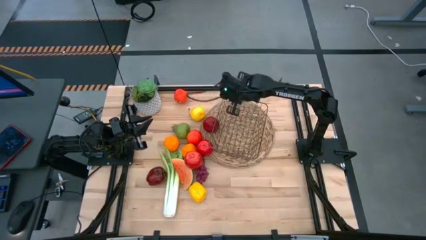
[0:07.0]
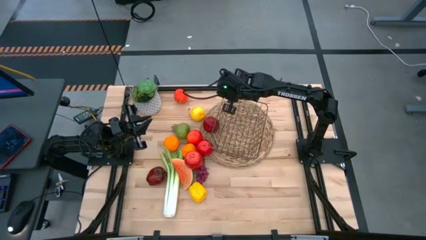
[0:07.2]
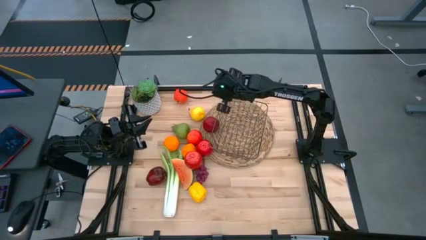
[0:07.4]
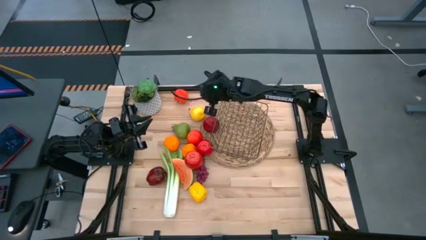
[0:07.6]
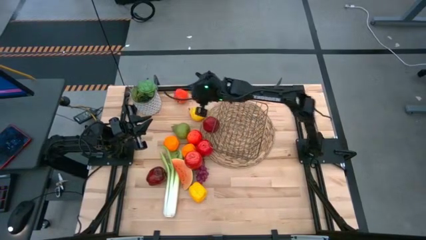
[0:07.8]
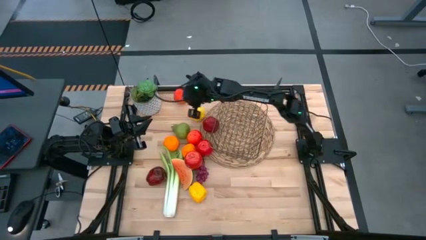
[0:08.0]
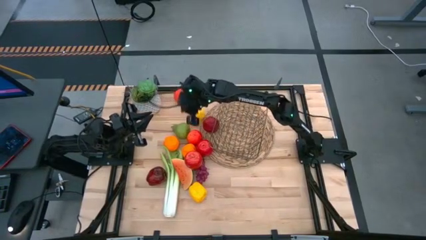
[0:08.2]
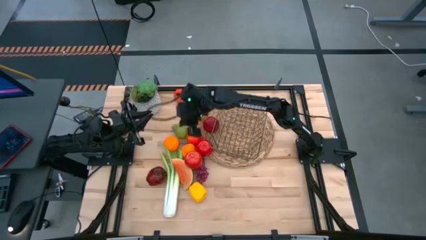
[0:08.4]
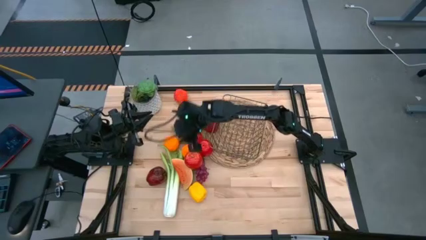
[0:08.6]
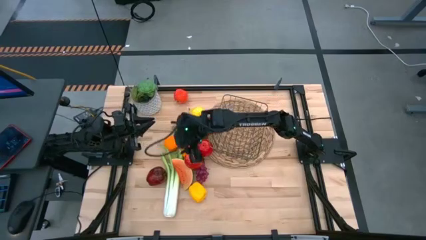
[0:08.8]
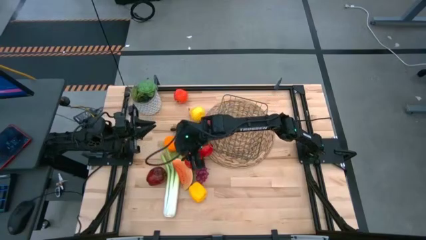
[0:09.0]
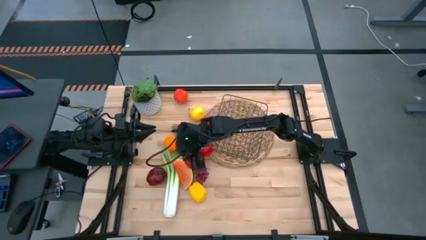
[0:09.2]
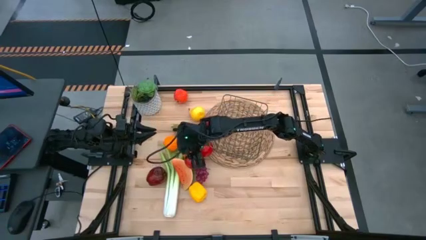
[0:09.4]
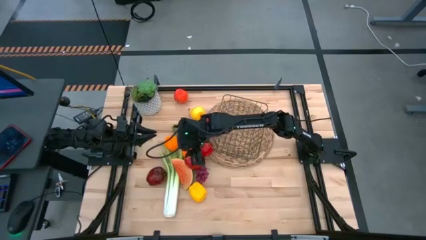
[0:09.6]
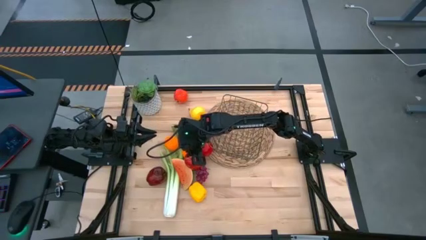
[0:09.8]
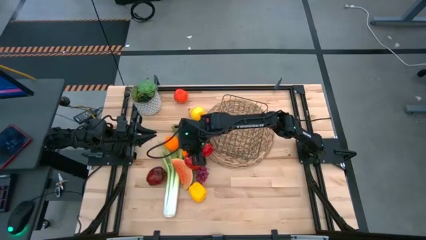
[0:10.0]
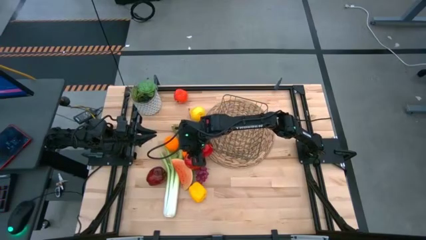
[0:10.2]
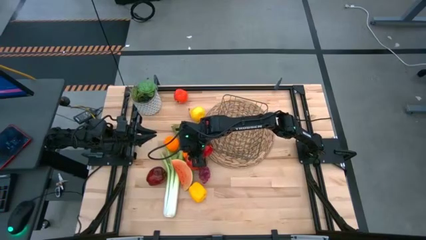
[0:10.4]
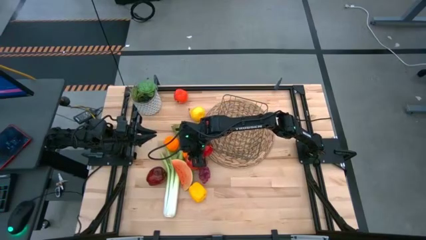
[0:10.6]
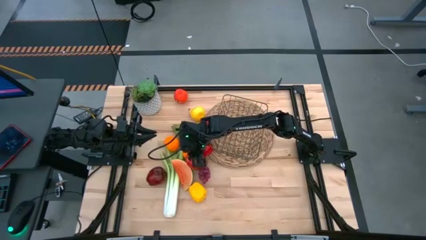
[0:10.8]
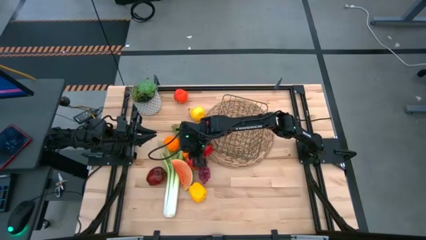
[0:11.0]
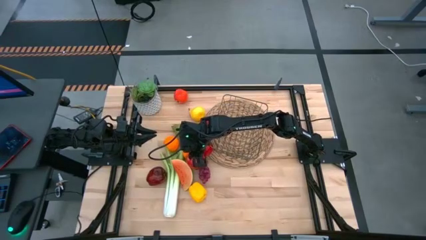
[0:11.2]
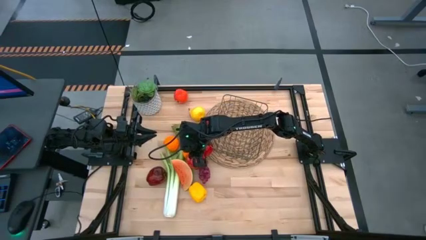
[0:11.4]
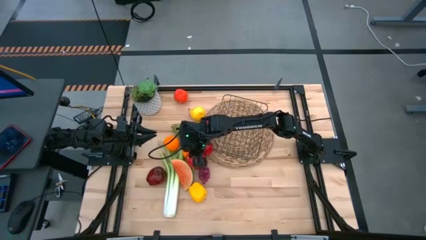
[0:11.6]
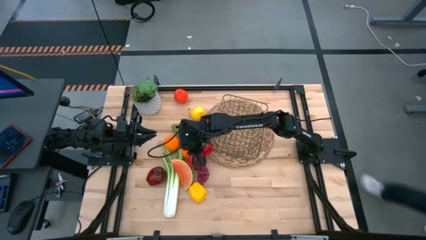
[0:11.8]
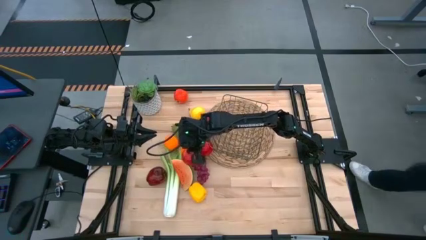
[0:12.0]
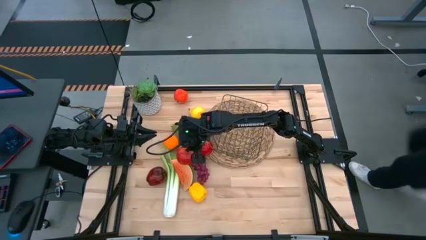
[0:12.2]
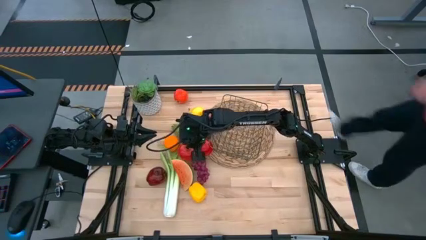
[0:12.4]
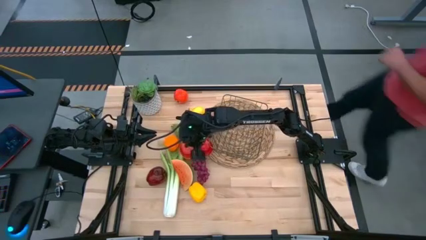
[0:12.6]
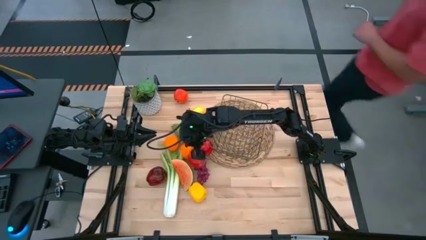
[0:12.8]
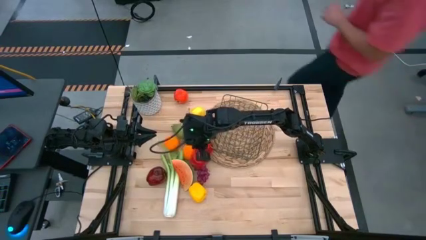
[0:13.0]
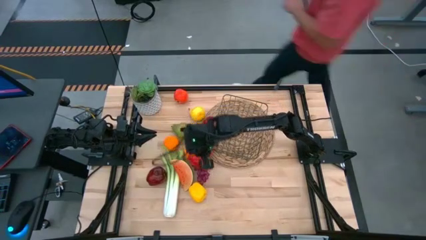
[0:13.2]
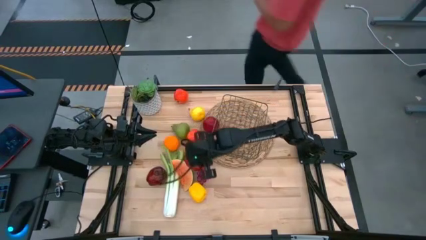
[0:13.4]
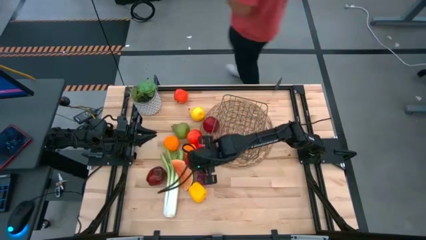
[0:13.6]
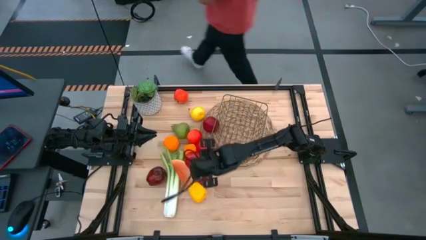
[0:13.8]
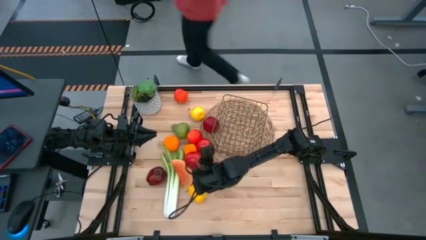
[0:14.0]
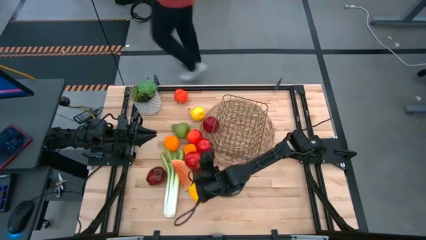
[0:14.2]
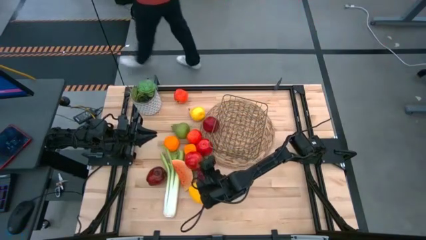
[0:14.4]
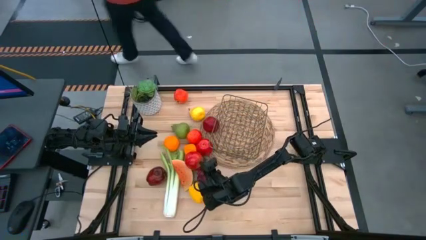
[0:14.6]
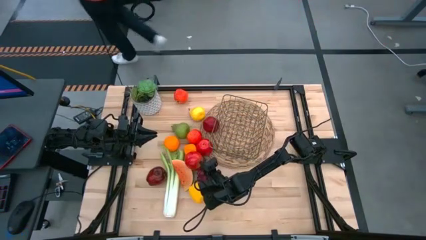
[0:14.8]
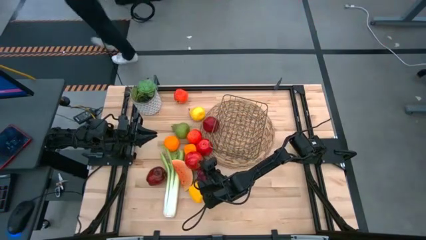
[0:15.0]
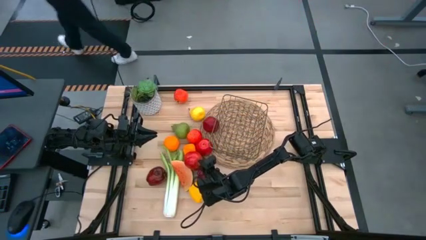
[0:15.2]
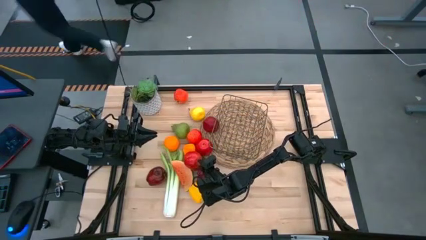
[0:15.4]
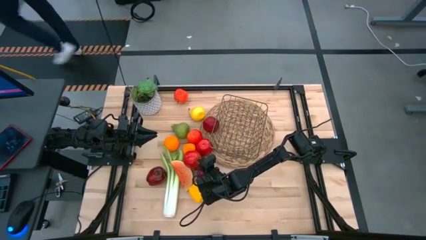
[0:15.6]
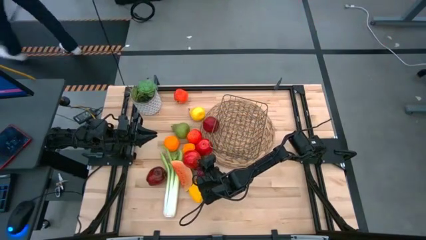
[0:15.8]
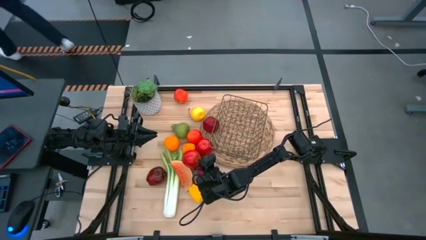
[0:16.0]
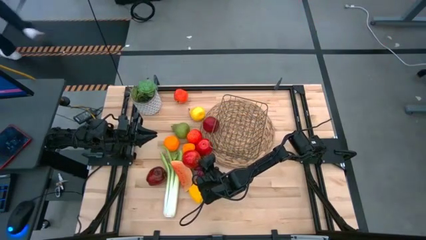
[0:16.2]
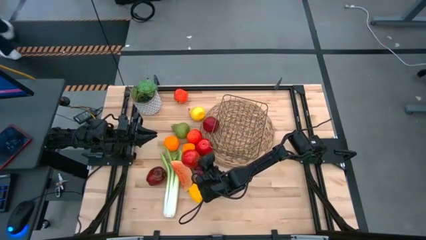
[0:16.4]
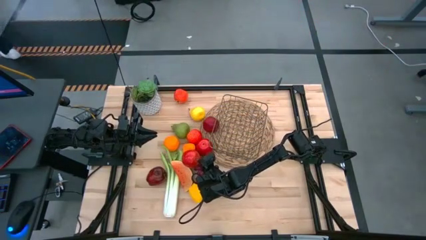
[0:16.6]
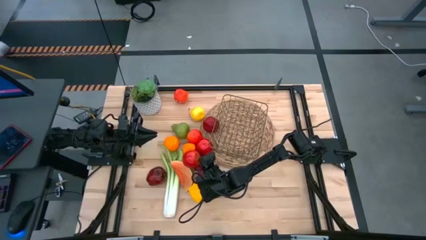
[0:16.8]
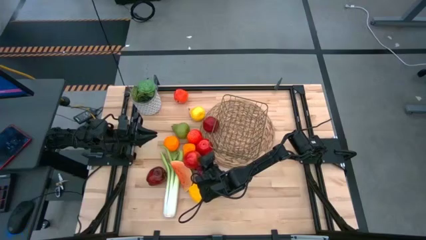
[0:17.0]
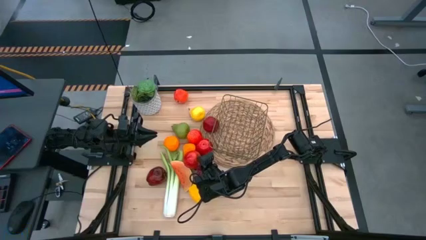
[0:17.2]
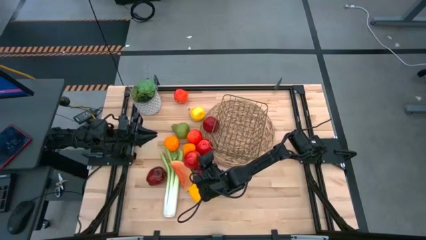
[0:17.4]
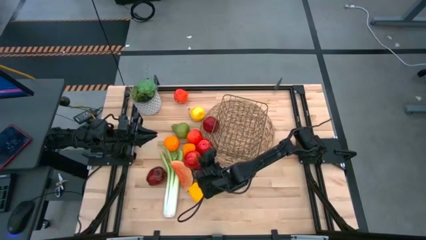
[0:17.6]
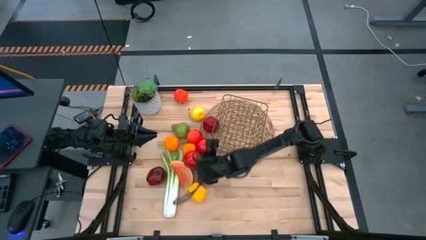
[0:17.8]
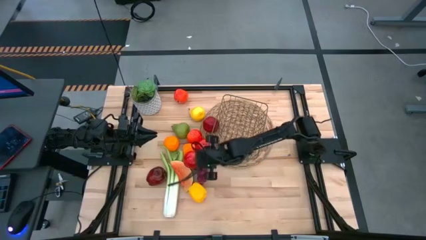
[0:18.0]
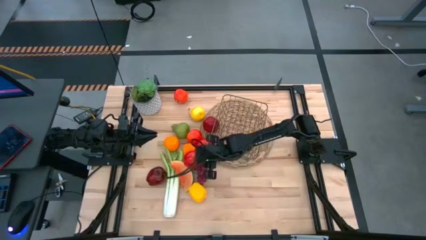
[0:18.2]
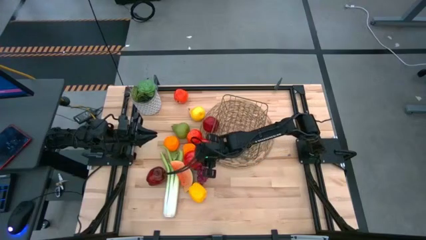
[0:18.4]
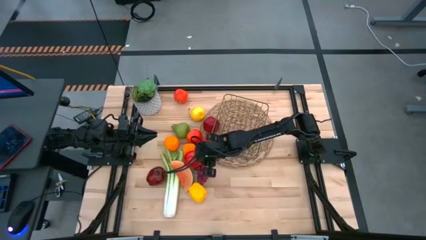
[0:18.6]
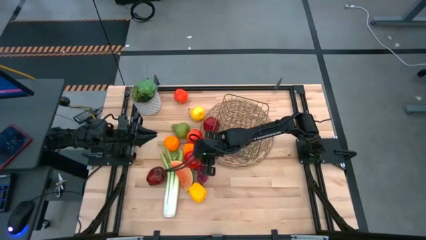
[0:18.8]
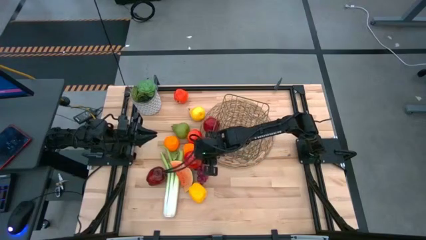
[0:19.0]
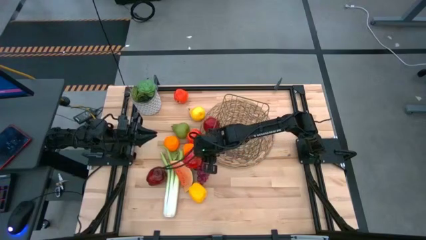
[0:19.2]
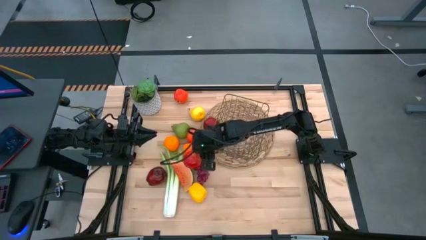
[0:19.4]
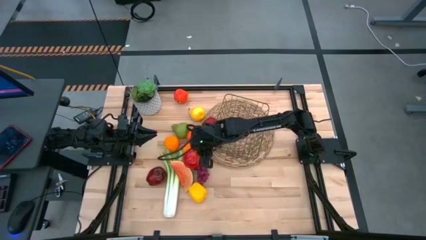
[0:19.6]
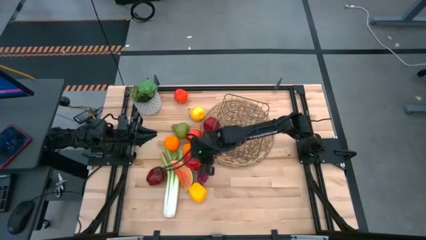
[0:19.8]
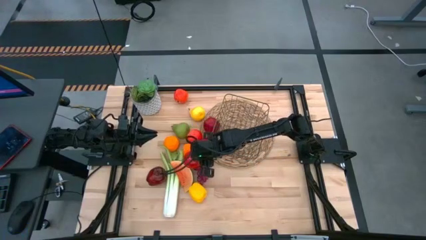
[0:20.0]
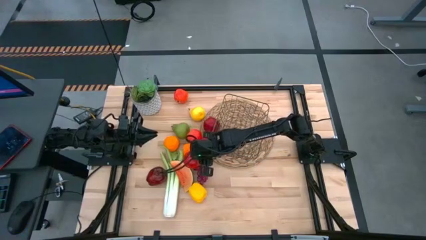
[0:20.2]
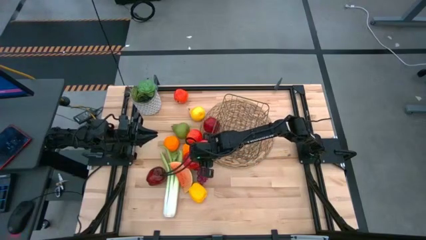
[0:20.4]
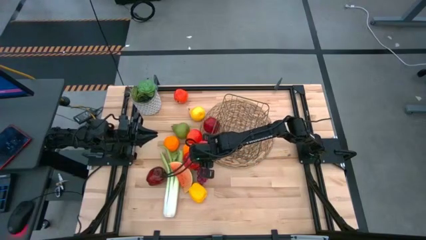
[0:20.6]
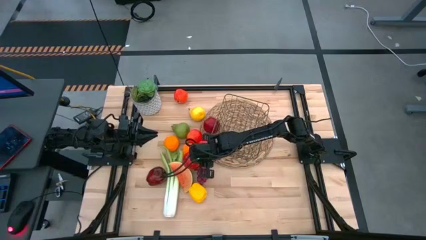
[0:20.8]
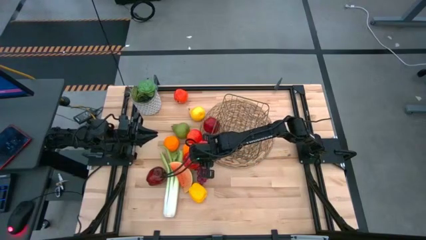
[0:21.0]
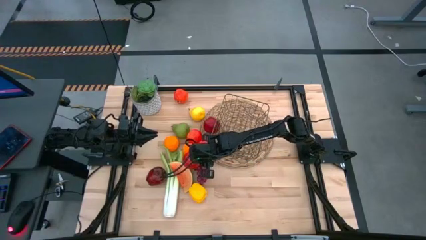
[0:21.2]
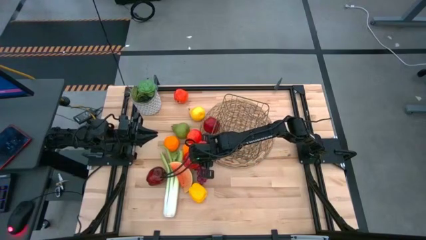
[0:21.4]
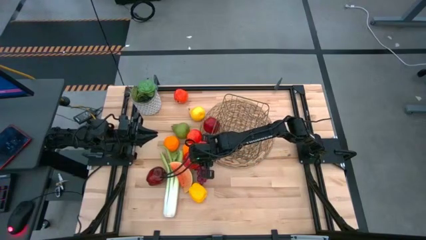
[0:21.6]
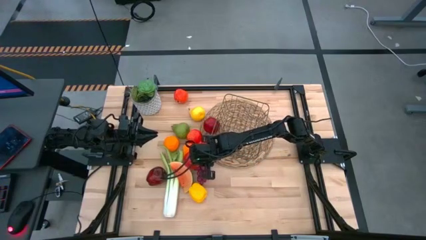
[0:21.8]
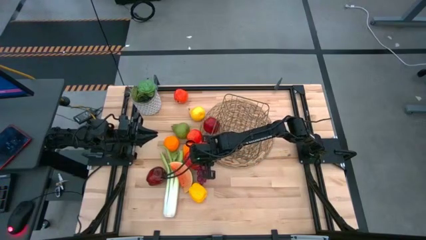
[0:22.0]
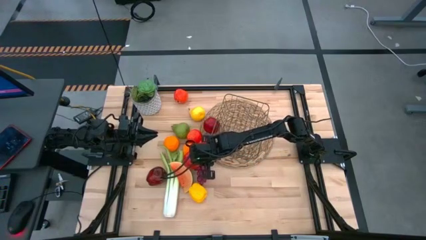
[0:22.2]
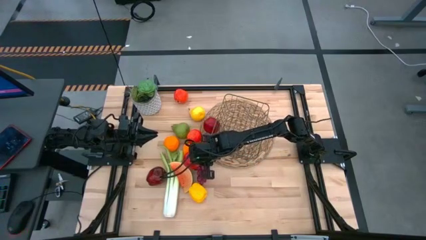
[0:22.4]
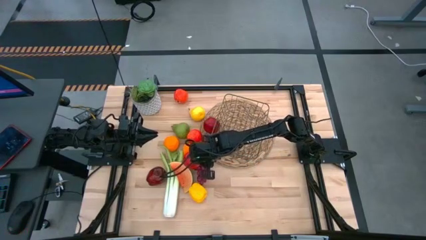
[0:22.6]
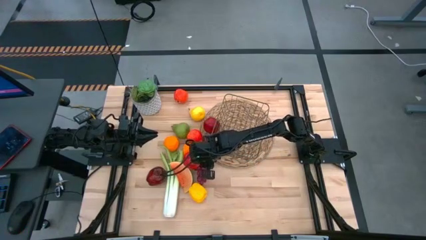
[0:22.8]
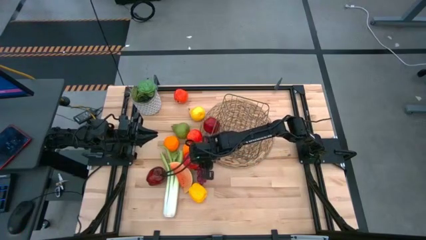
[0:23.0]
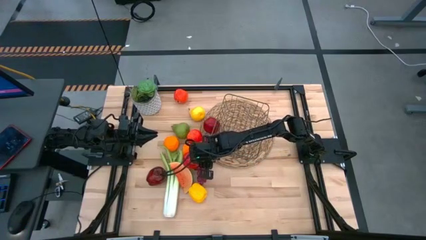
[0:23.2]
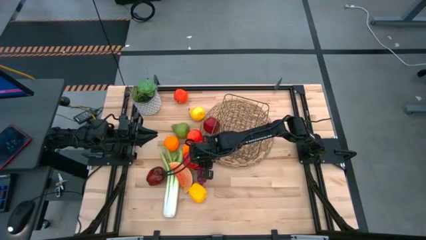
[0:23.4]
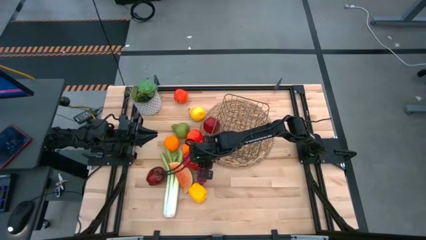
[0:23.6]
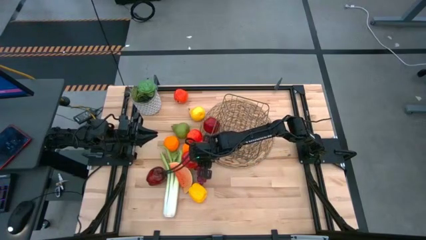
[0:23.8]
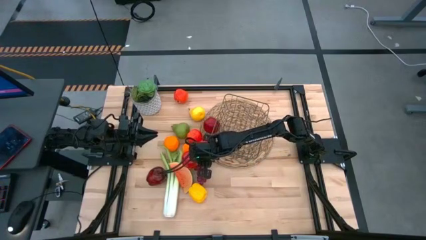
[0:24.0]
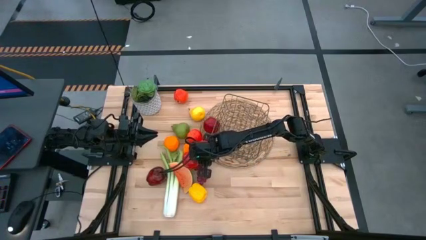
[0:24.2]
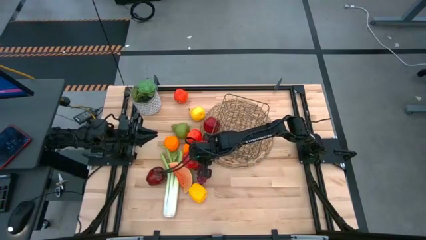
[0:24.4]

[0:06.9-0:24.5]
Task: Build produce basket
Put the red apple into the gold wire basket
